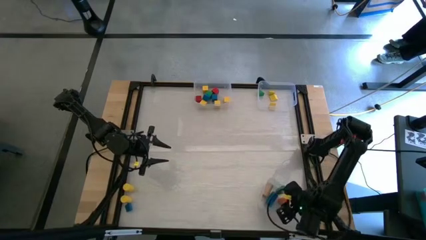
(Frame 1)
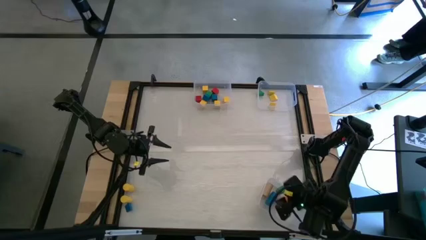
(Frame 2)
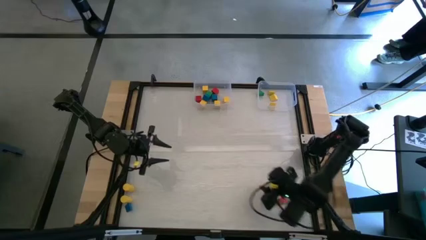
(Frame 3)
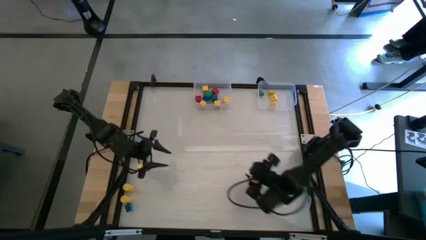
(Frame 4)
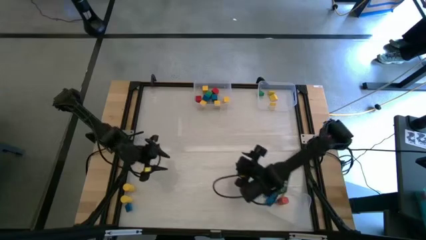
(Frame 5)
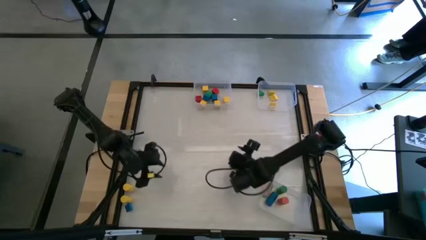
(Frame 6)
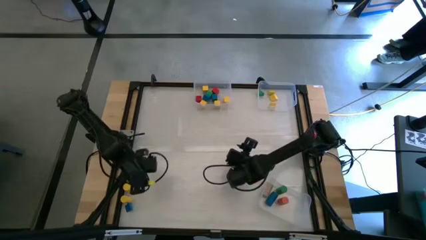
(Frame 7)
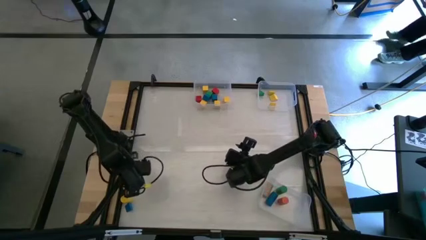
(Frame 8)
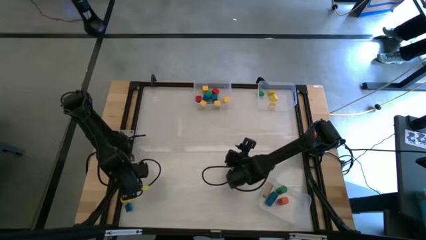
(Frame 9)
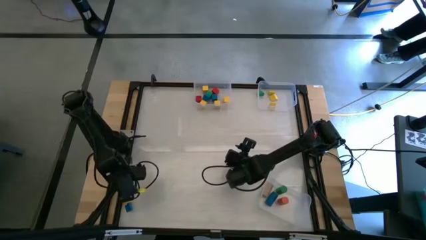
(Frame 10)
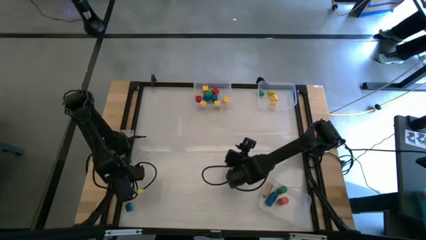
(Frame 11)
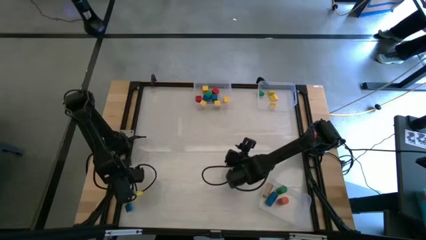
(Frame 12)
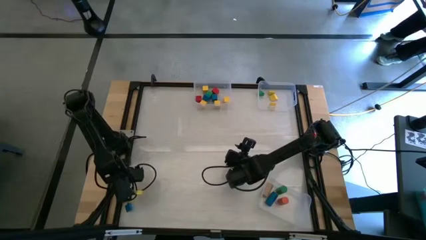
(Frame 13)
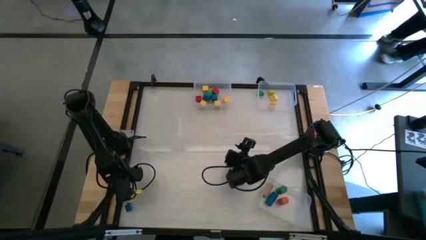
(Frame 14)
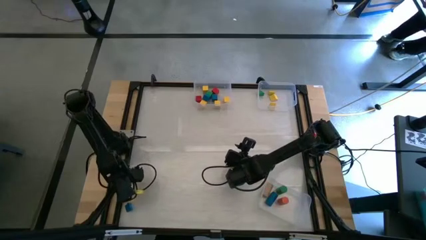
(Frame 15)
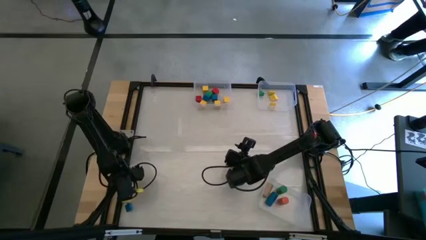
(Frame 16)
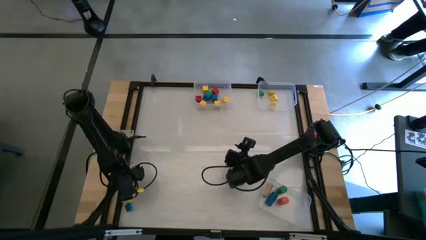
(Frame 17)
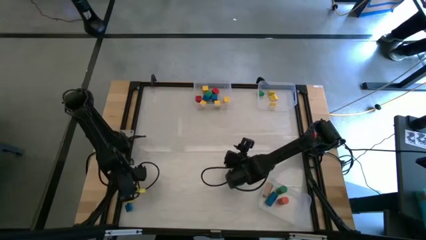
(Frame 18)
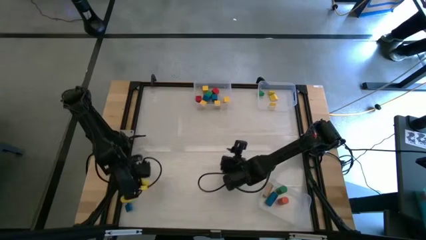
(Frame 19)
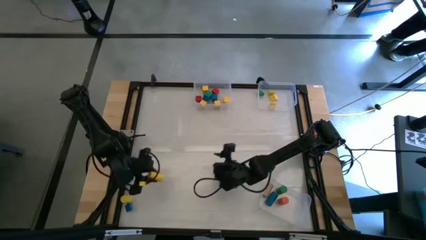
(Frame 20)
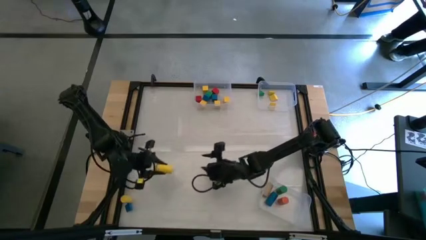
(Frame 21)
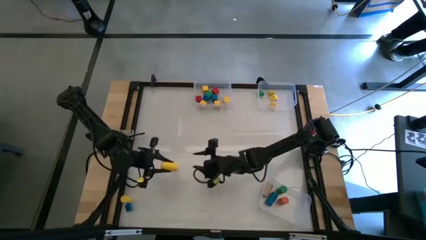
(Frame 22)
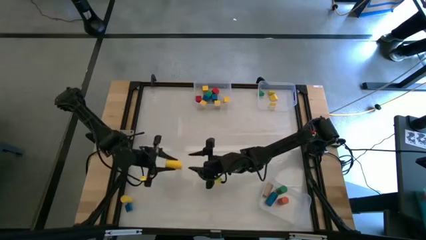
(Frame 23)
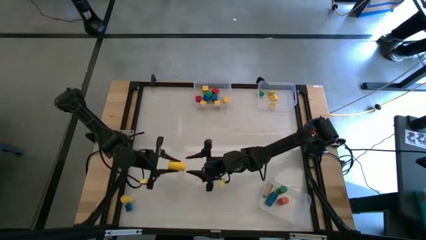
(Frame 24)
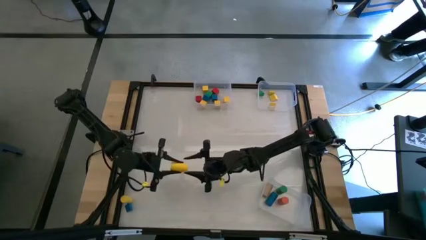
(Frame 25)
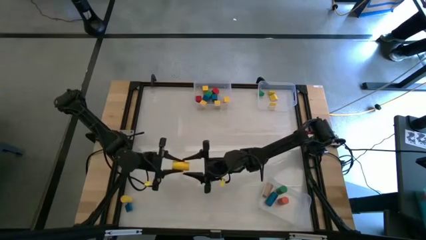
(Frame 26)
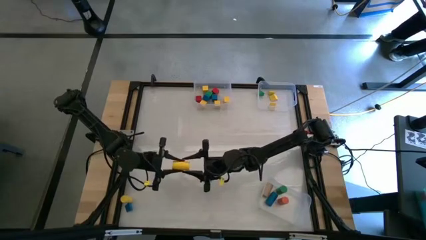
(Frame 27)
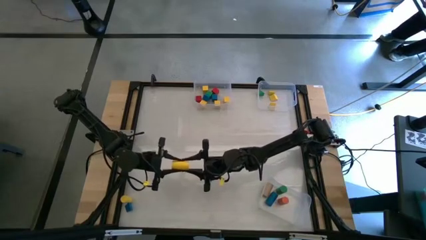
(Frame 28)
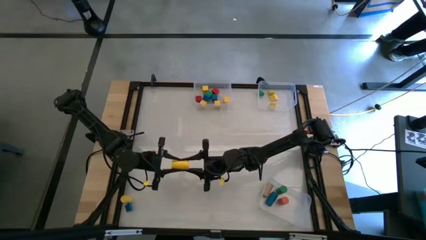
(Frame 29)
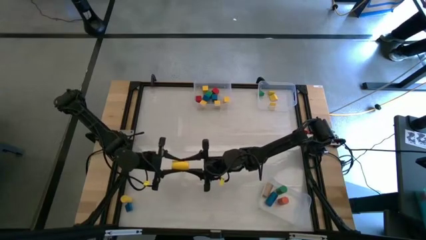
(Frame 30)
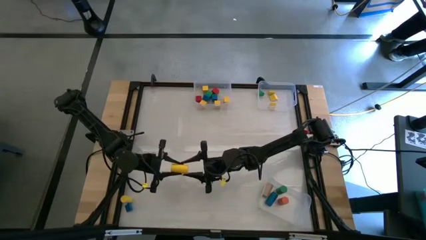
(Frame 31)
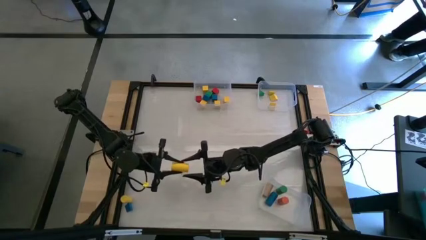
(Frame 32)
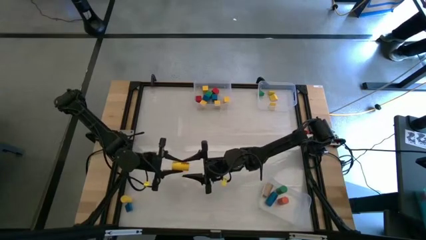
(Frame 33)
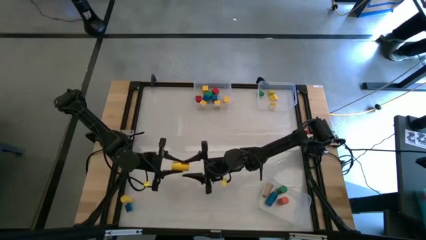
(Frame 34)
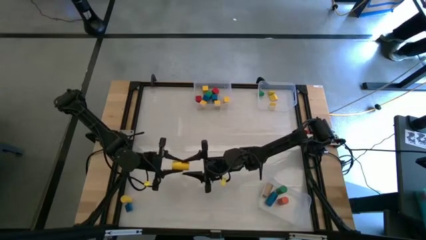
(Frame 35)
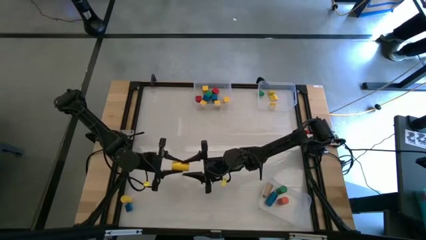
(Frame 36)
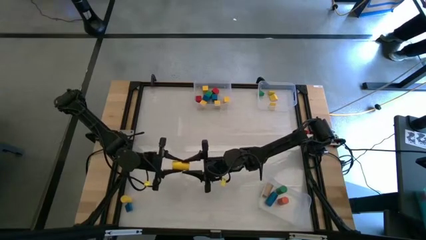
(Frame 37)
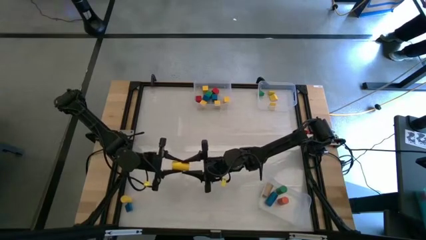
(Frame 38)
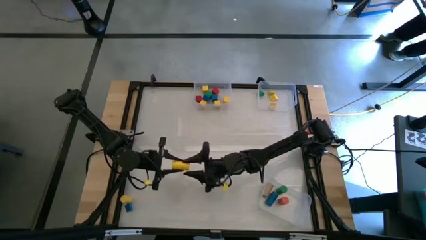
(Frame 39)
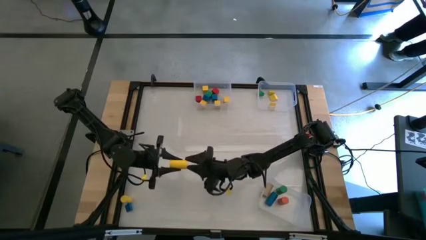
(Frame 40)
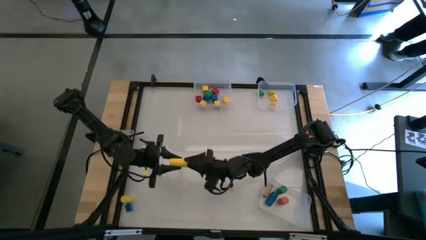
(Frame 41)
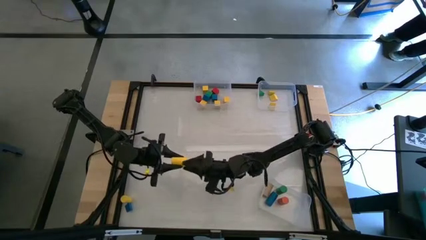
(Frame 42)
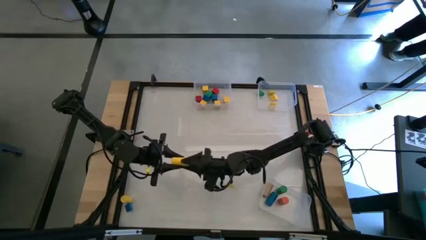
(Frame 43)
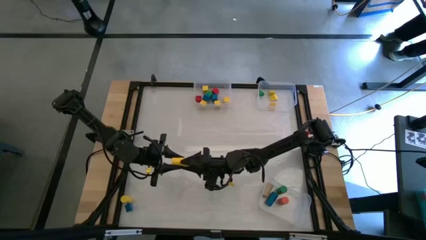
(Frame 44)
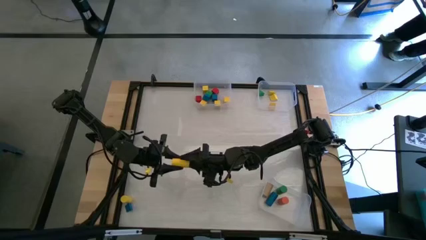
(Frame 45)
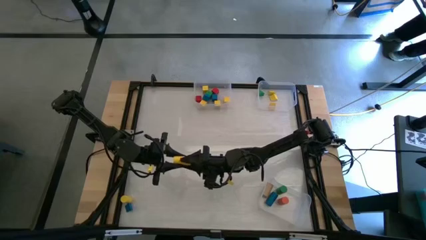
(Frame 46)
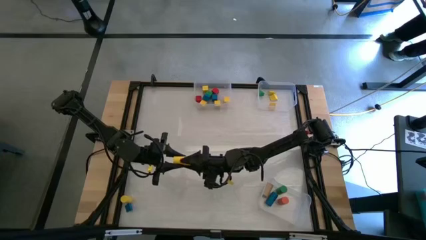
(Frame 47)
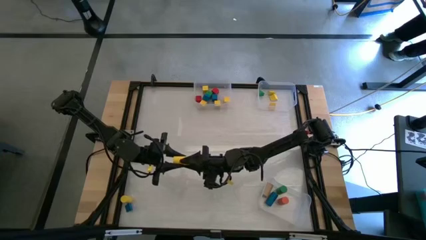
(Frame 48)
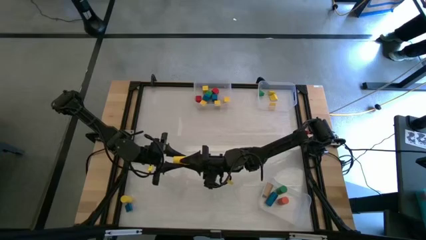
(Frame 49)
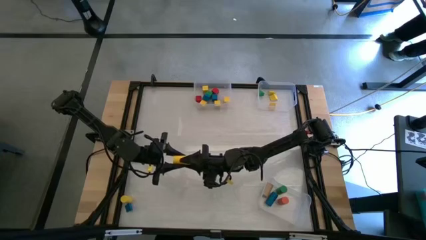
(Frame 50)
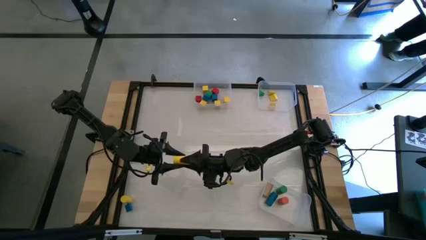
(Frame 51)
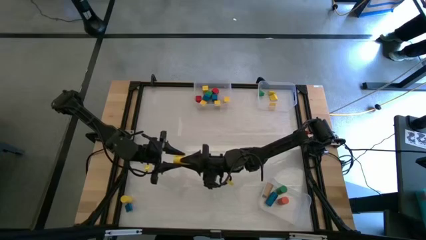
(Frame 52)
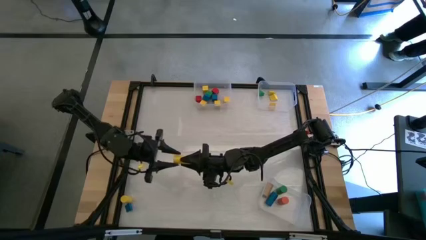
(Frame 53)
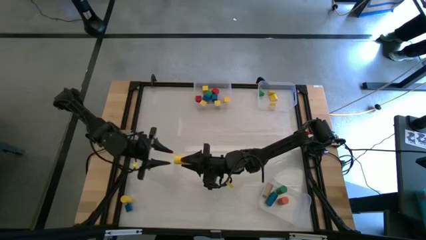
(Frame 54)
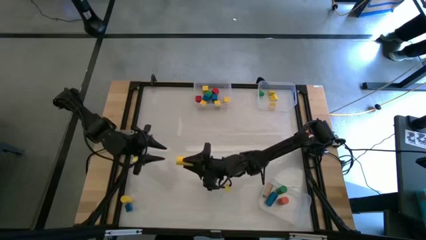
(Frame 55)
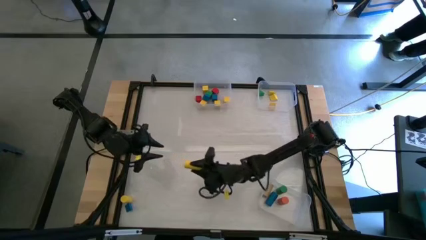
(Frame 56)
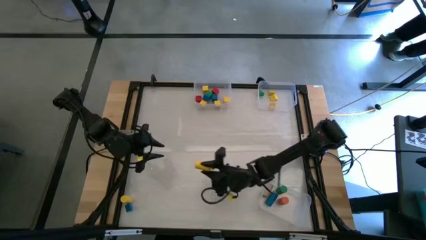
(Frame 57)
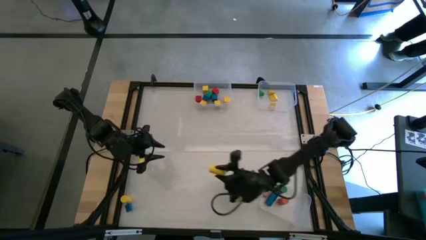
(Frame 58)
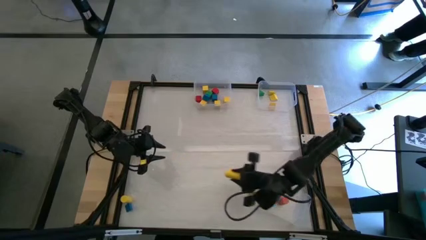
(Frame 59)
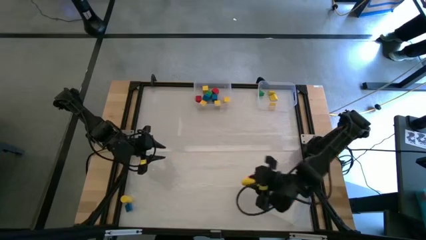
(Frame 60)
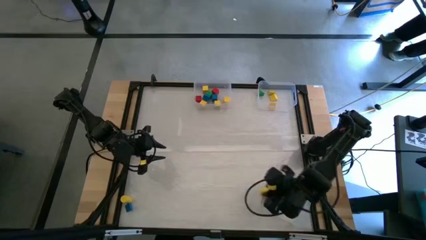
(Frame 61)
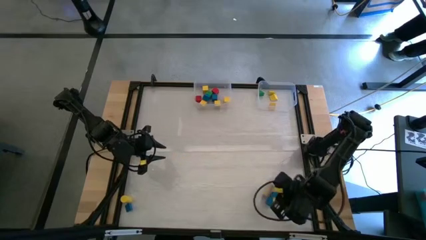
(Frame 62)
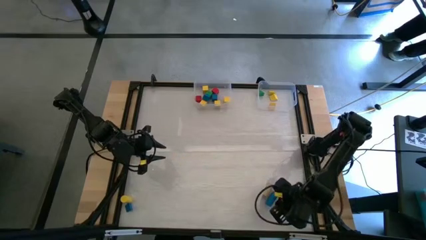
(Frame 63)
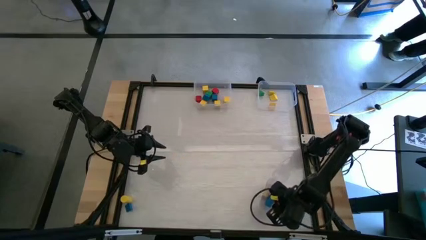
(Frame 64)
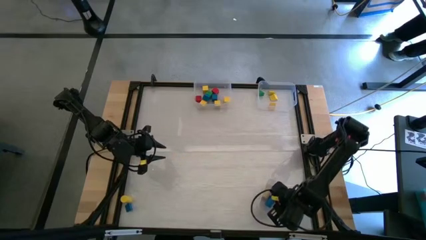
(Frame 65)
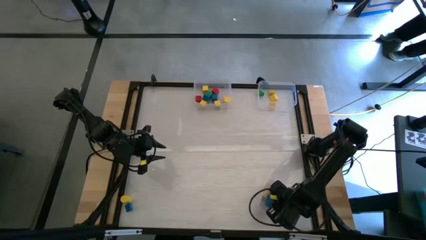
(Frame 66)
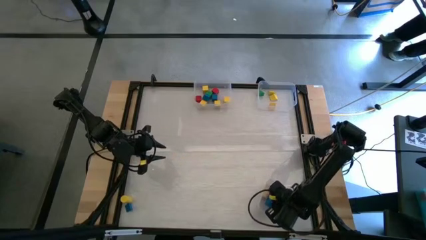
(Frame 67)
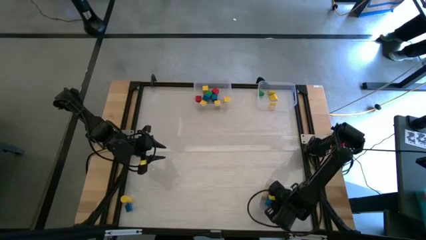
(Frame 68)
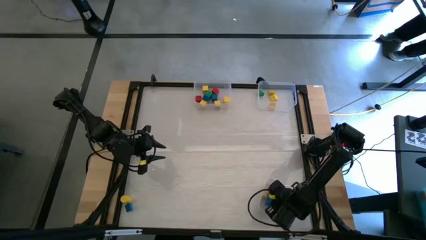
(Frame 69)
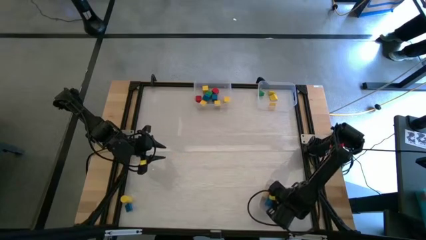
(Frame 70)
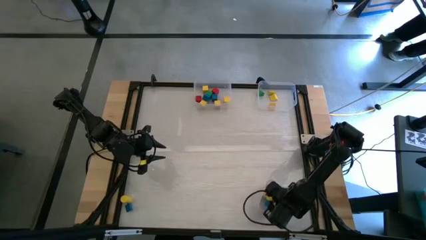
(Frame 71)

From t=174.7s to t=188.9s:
Task: Sort blocks by size
Put the cylinder yellow block into the bottom right transparent bin

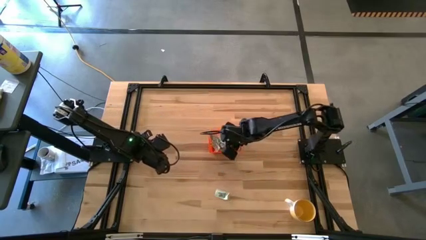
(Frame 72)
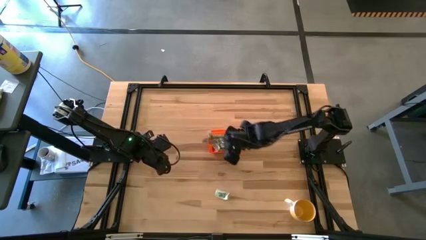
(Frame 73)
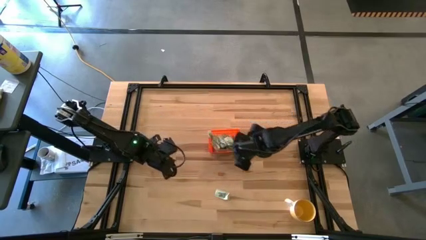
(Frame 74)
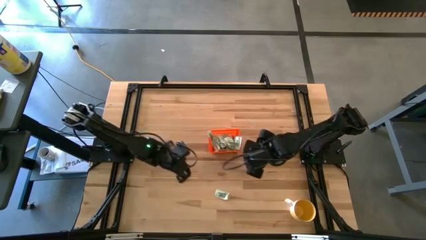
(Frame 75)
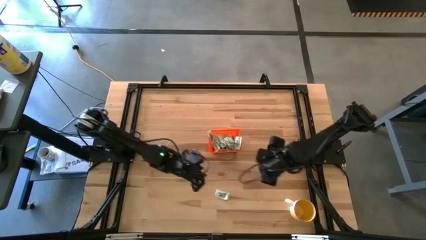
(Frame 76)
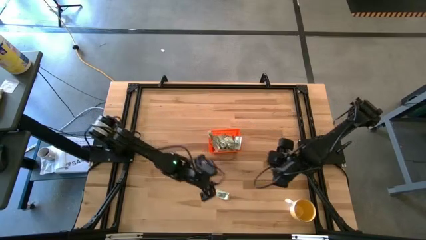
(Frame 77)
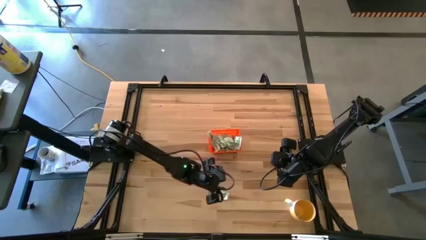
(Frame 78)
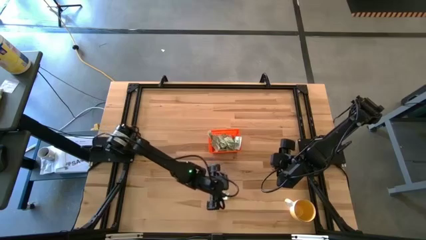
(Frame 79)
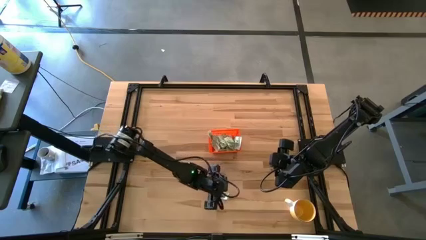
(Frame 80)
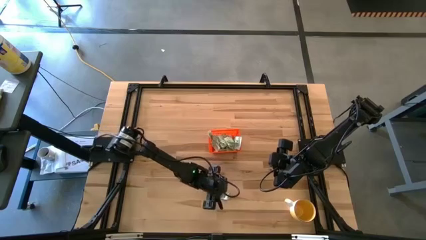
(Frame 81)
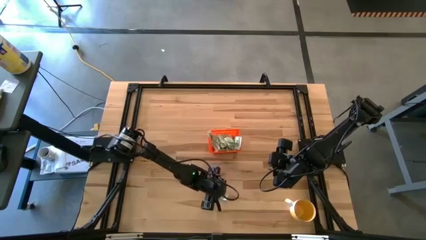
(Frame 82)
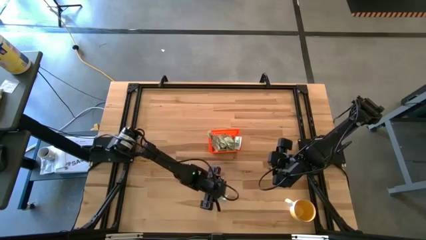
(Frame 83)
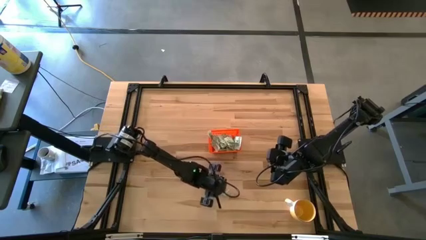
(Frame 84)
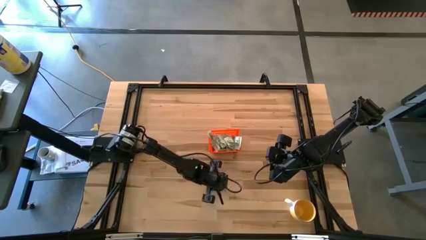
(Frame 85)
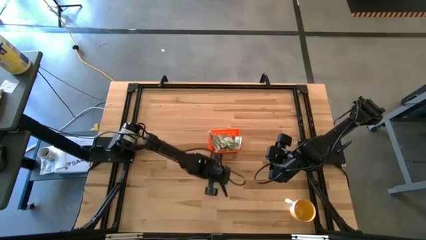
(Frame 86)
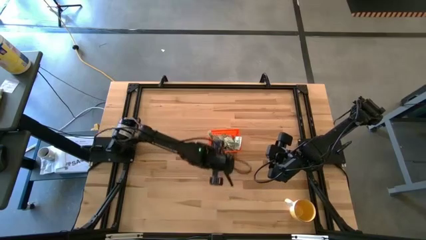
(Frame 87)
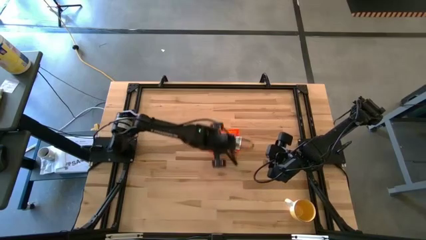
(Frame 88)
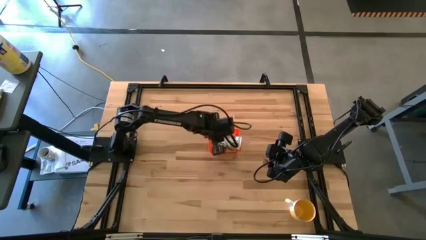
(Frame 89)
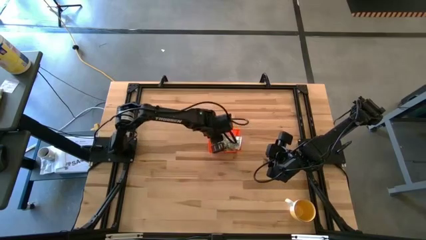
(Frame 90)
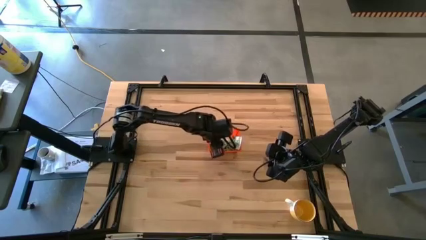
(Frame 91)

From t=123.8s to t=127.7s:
Task: Pick and place Stevia / Truvia into bins
Put the light green stevia packet into the orange basket
